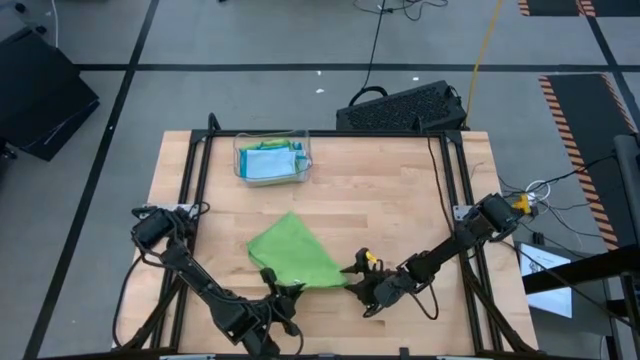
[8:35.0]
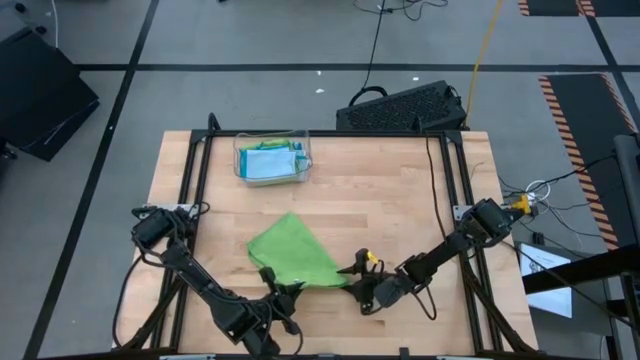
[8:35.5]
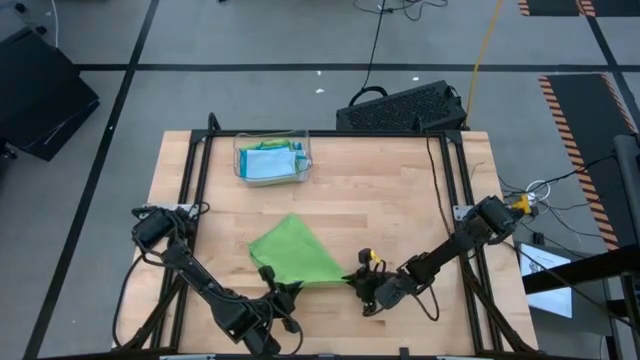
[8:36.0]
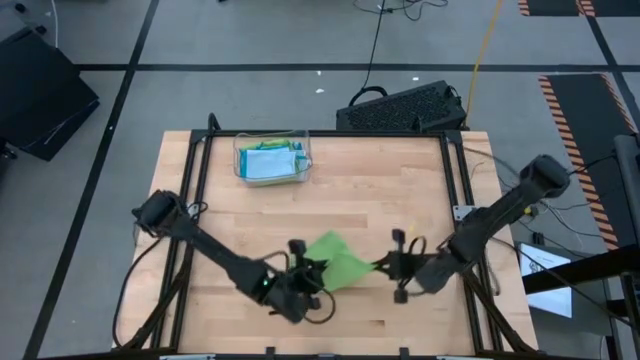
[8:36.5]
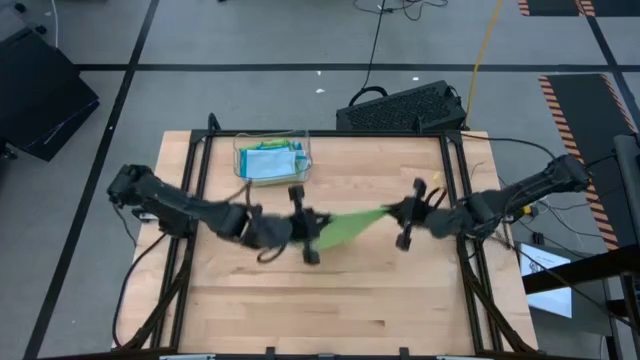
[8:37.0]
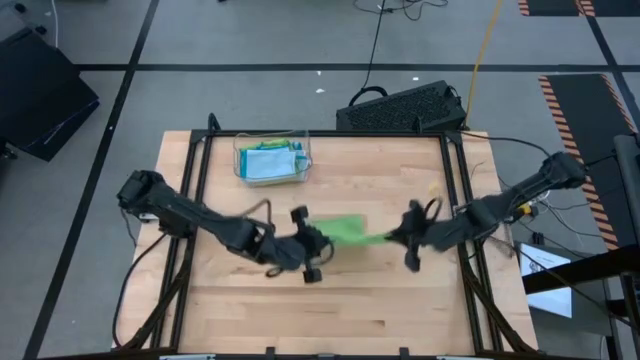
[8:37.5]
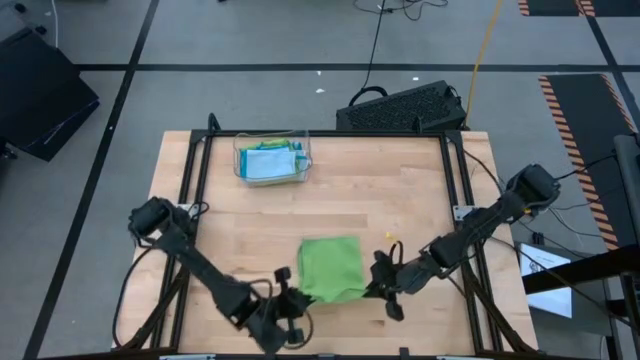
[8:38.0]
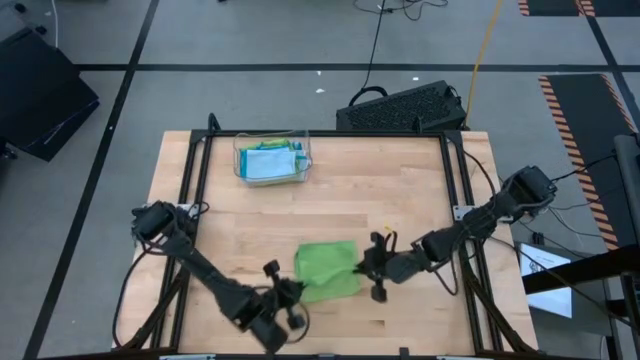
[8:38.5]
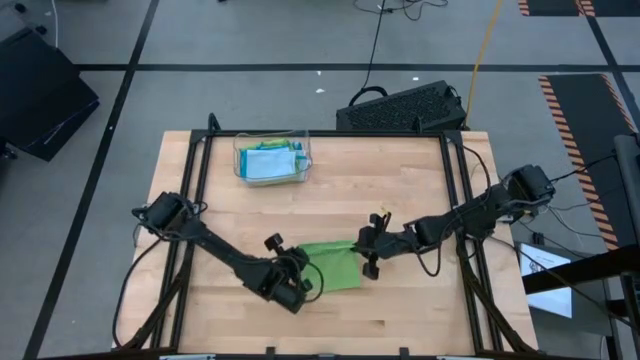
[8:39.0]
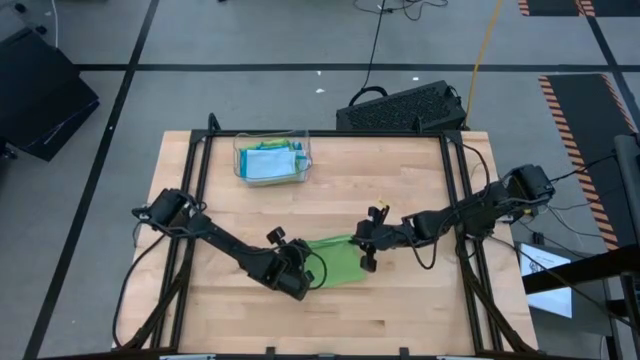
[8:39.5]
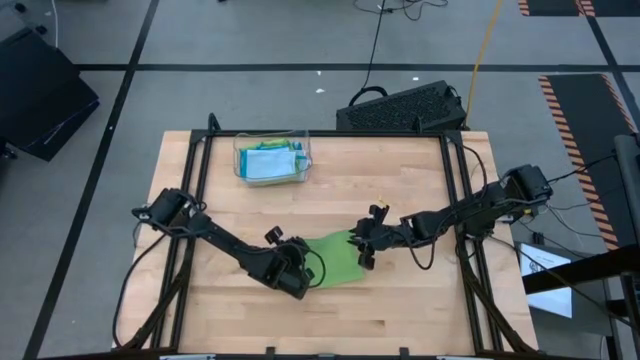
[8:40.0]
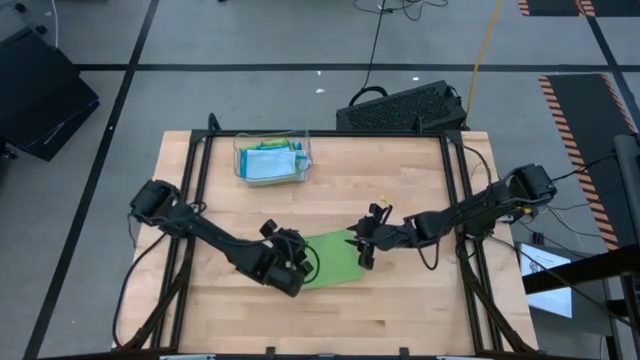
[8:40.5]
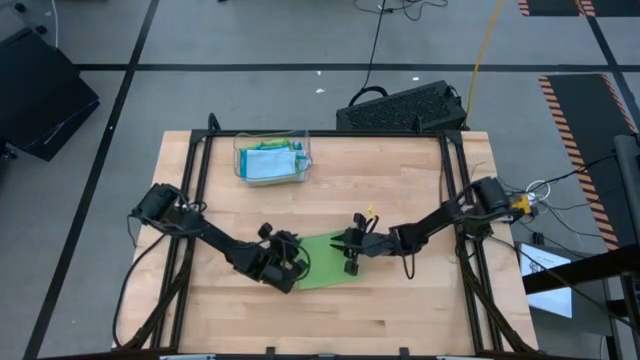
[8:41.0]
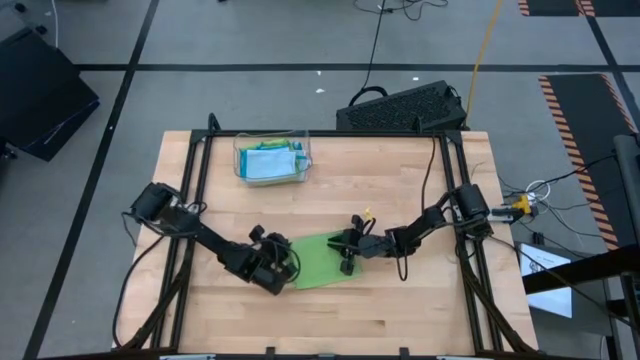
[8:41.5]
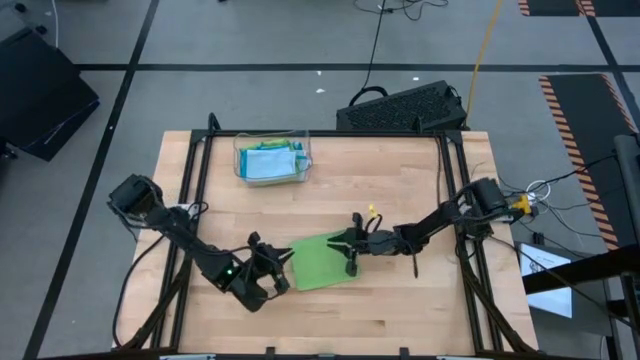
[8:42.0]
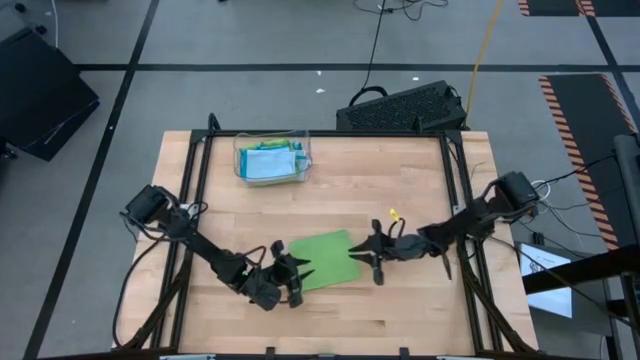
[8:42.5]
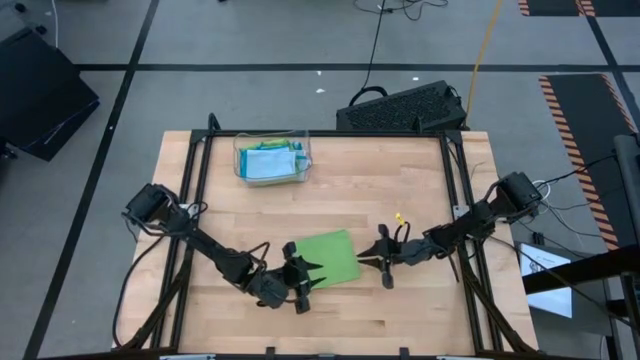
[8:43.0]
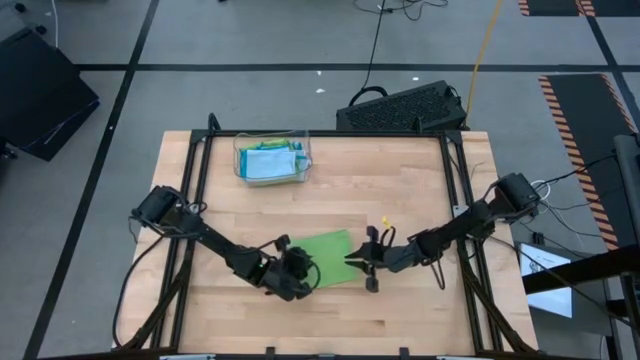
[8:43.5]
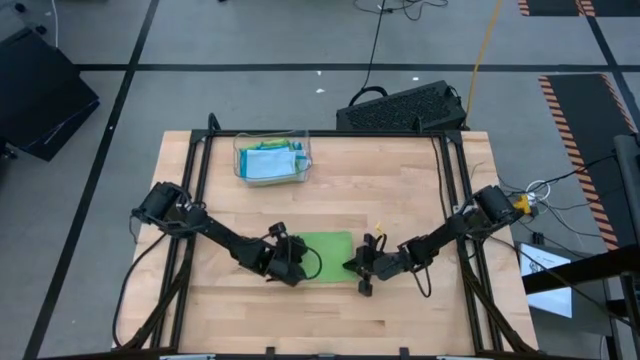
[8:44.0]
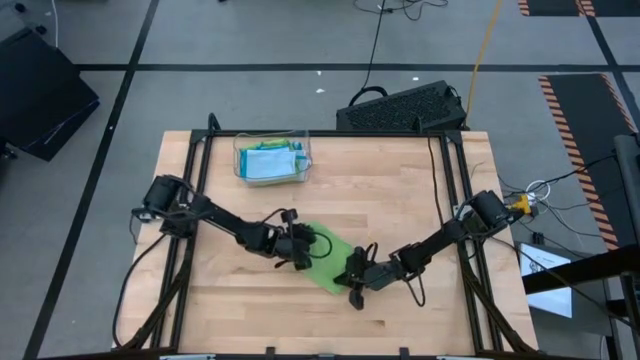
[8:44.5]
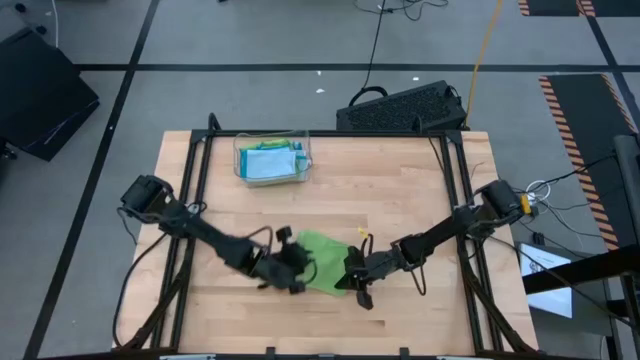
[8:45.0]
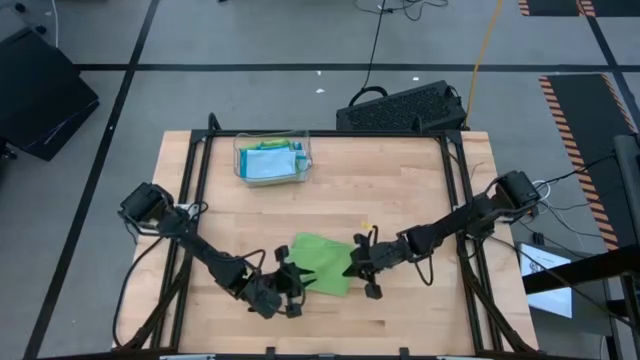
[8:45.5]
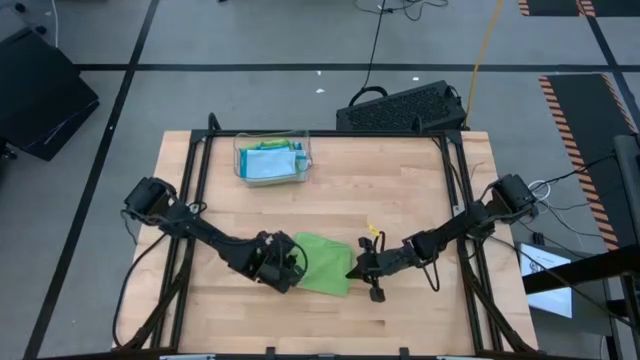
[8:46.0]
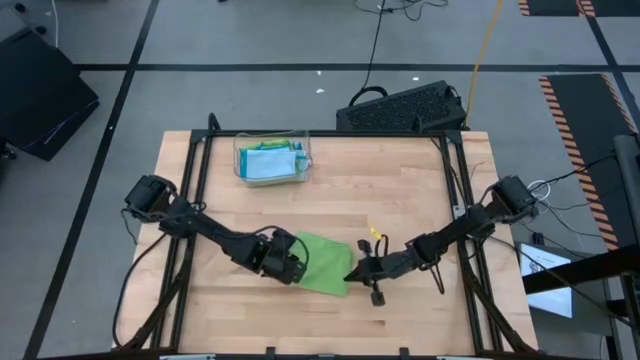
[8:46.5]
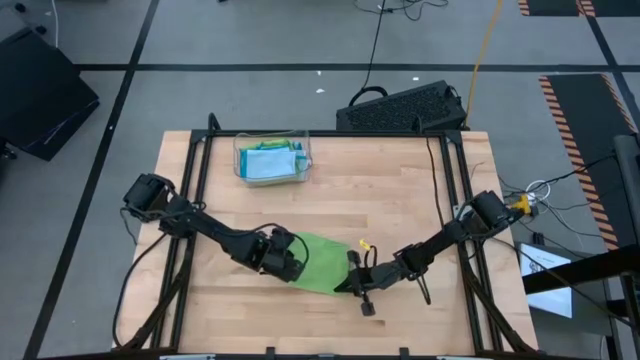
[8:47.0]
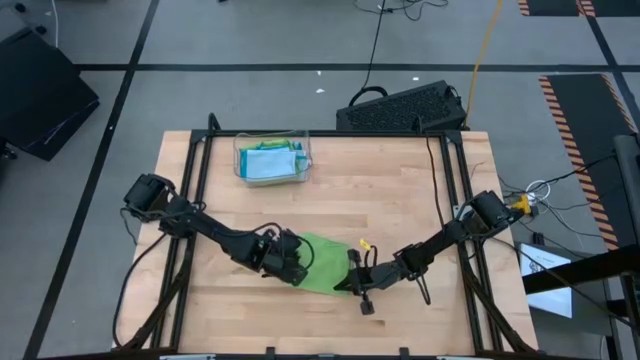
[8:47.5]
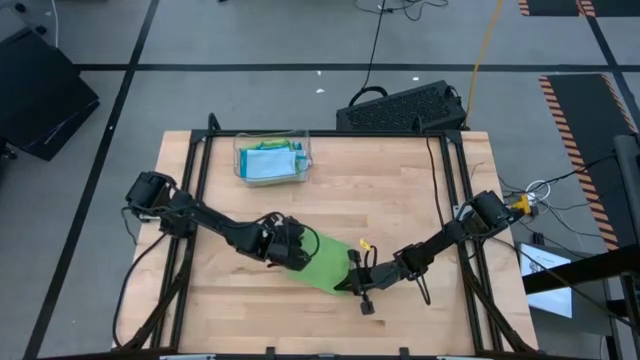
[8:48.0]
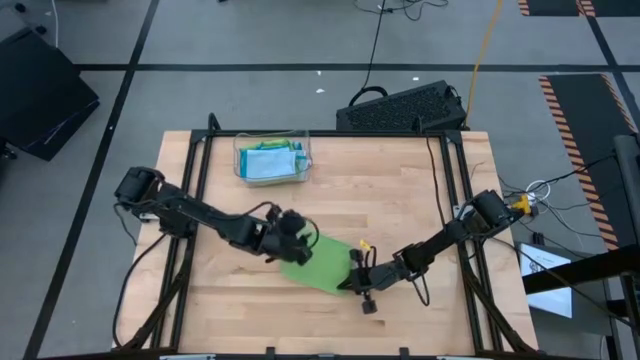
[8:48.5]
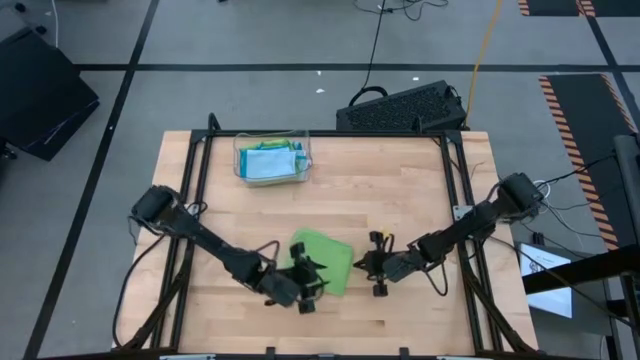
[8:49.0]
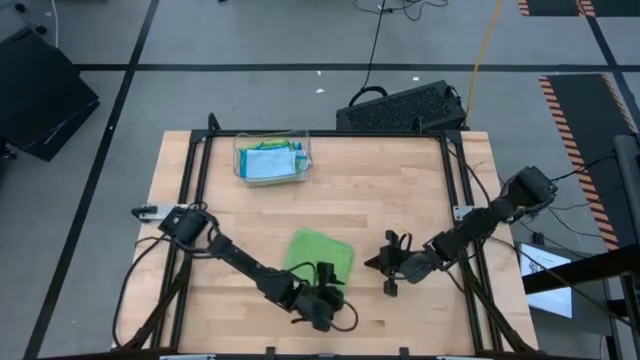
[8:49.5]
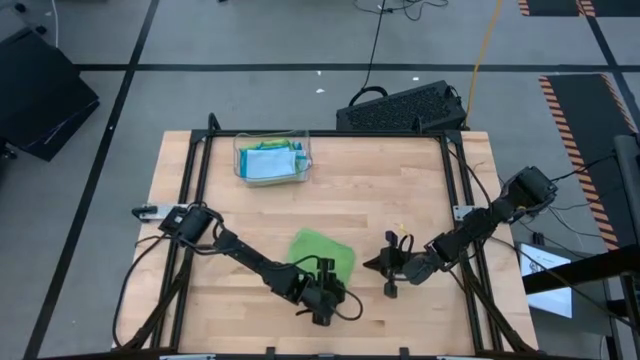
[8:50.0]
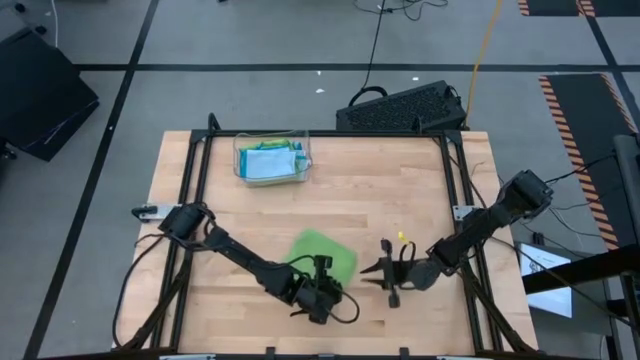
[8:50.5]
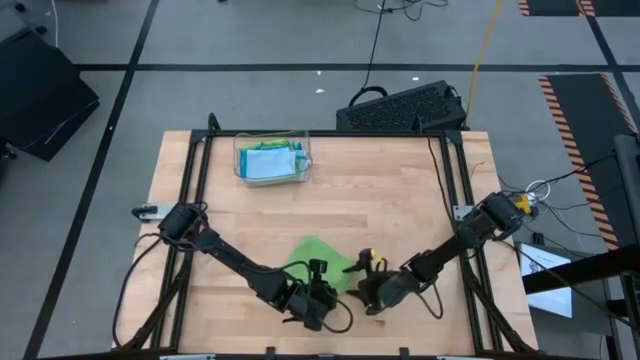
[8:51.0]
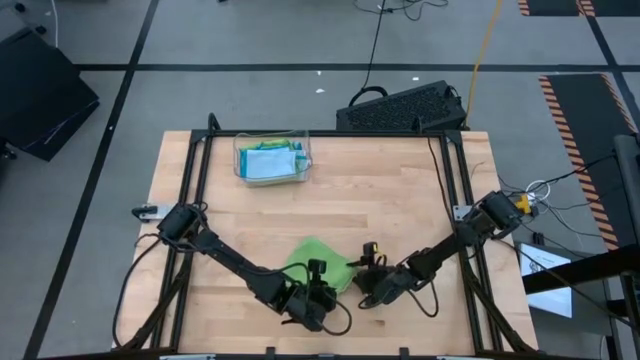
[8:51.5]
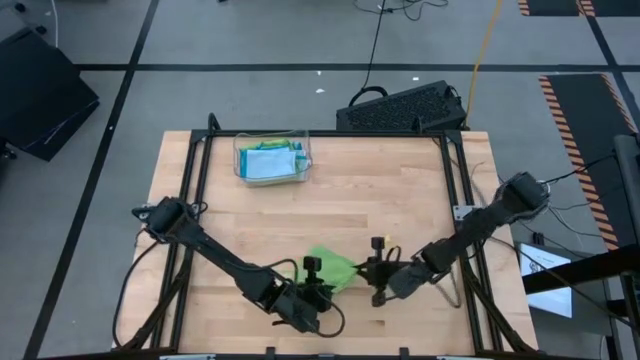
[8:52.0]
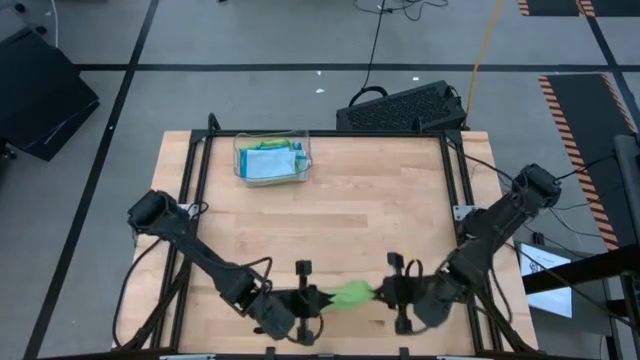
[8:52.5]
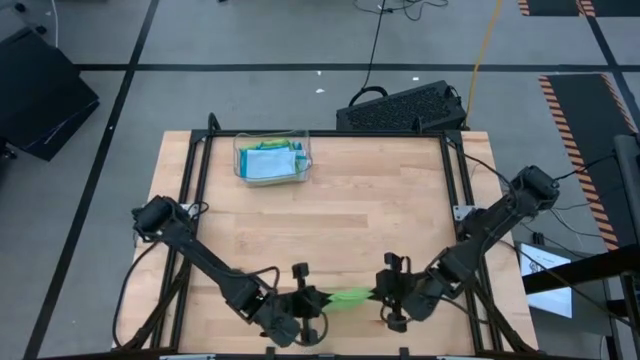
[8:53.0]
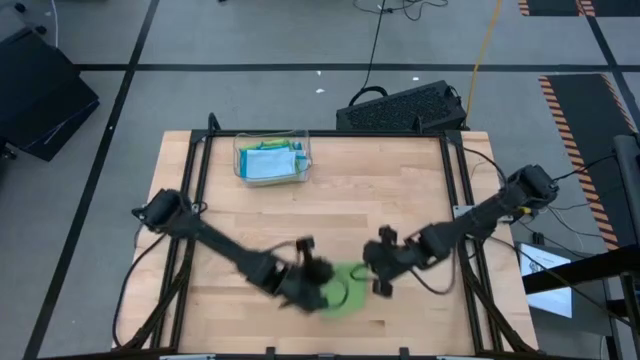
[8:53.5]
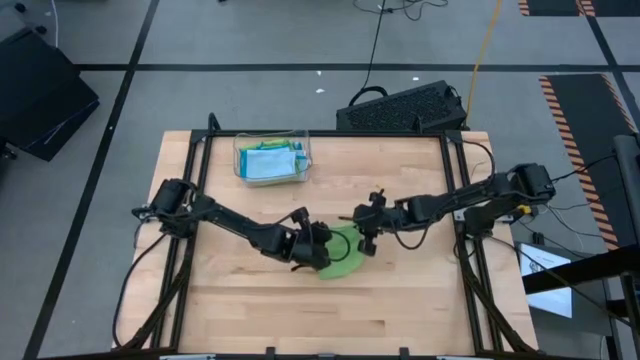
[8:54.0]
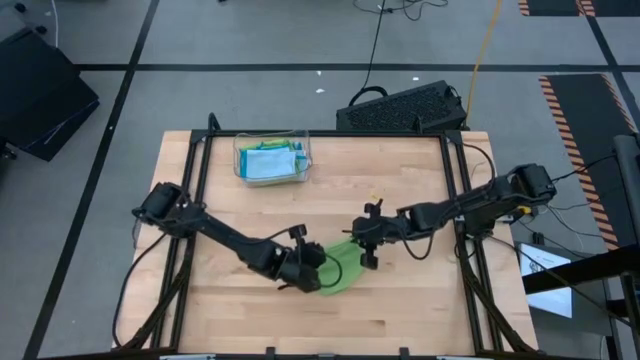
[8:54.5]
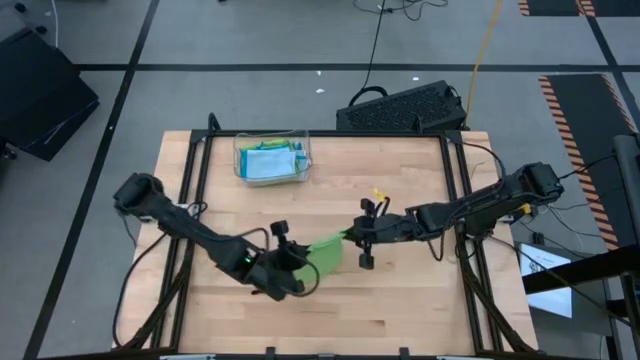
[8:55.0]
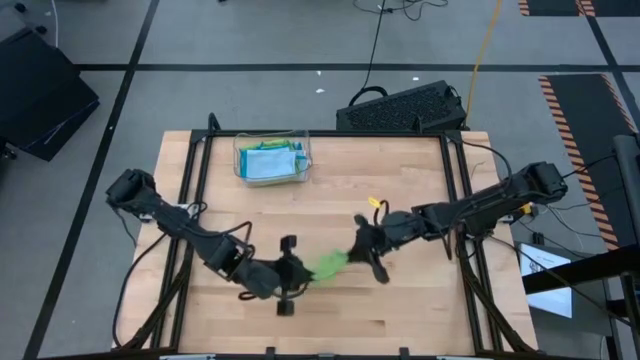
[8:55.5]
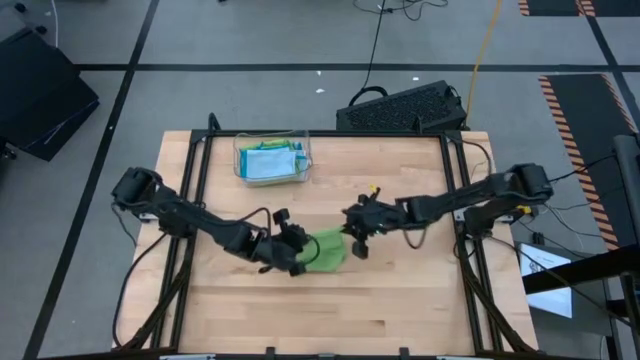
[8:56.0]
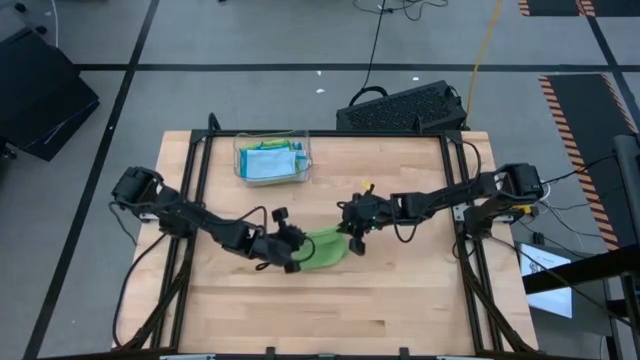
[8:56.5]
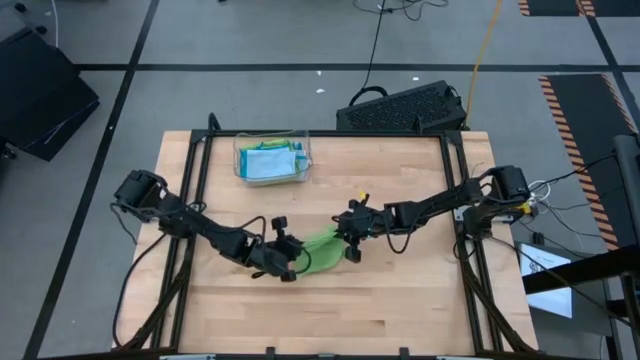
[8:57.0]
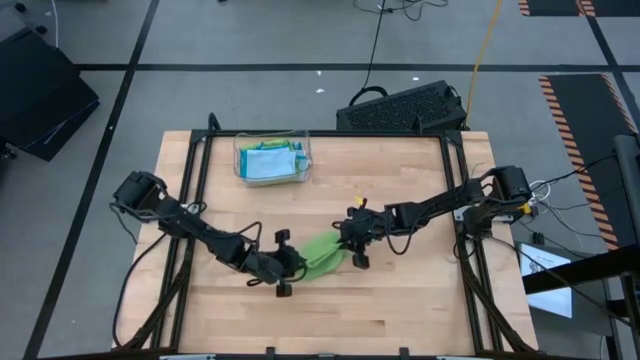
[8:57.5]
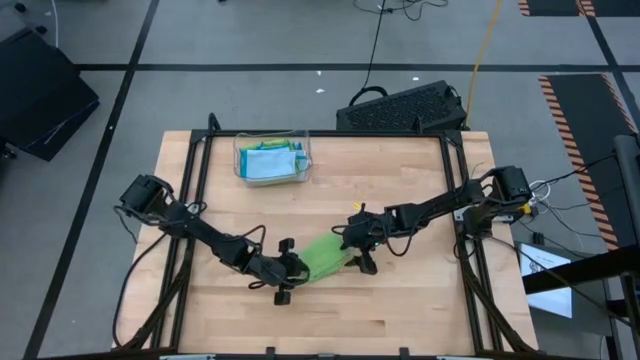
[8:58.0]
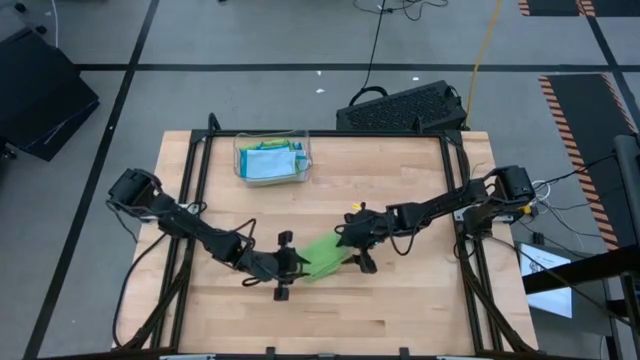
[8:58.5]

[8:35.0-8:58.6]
Task: Fold microfiber towels
Fold the green microfiber cloth
